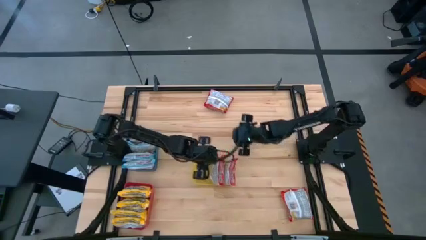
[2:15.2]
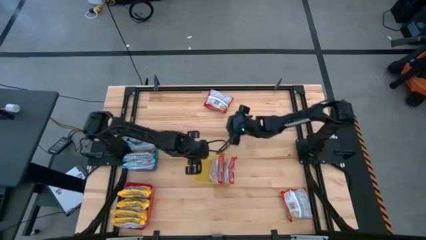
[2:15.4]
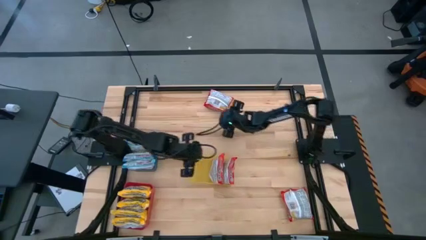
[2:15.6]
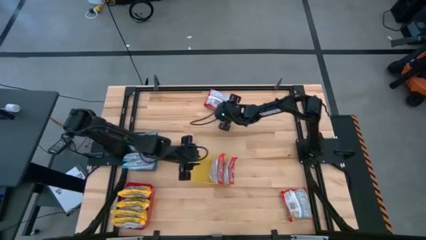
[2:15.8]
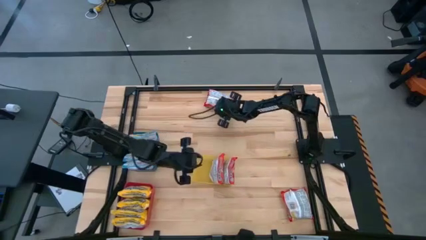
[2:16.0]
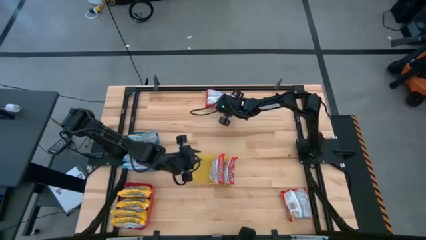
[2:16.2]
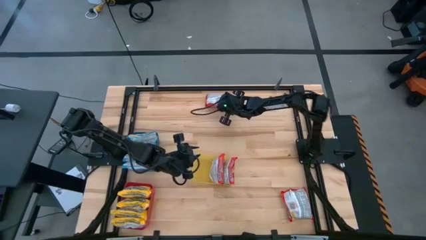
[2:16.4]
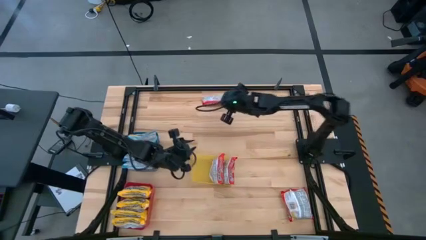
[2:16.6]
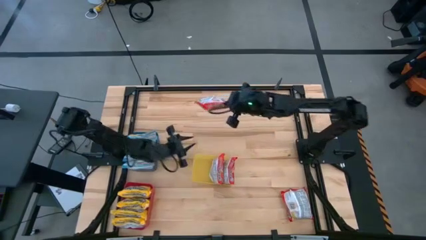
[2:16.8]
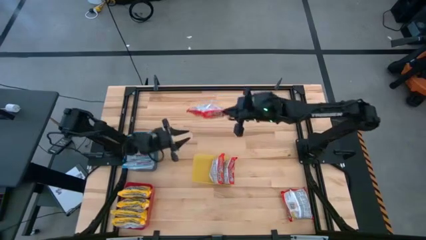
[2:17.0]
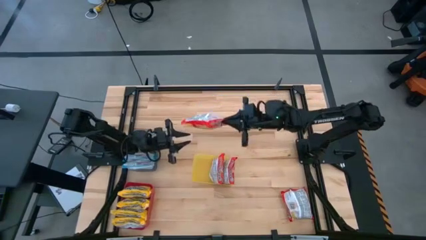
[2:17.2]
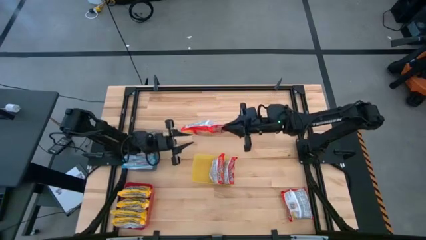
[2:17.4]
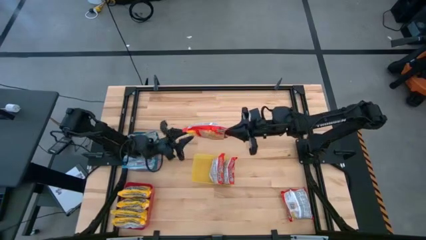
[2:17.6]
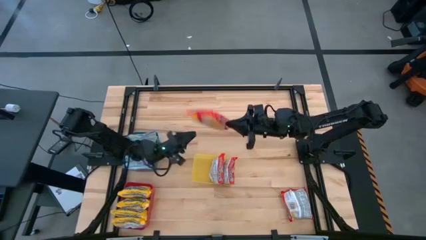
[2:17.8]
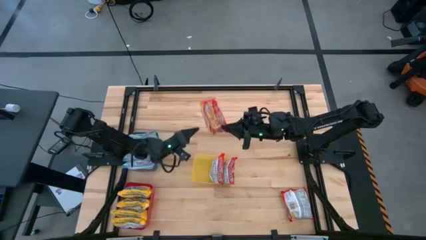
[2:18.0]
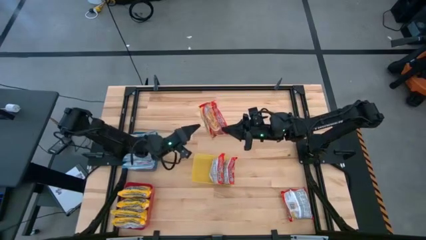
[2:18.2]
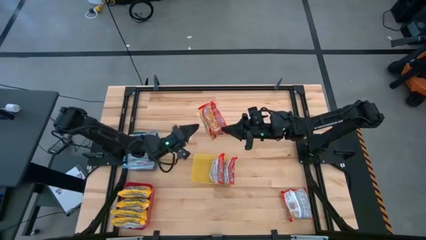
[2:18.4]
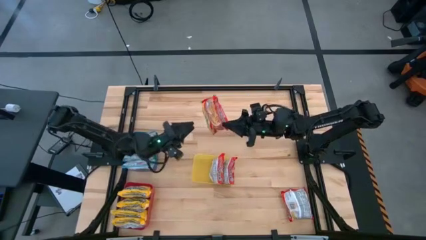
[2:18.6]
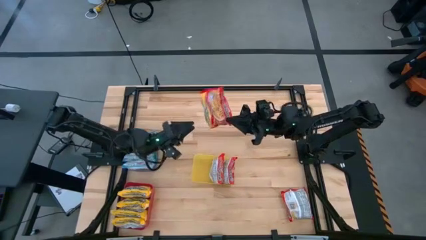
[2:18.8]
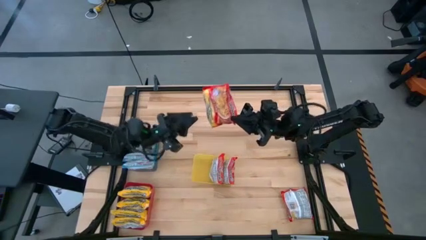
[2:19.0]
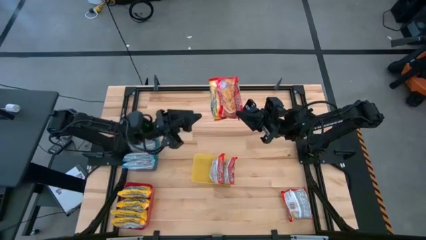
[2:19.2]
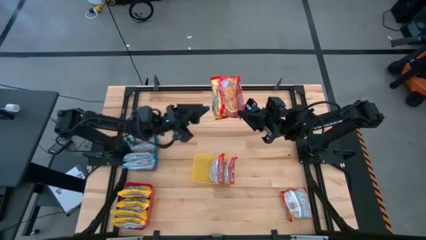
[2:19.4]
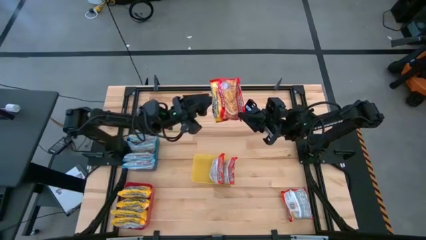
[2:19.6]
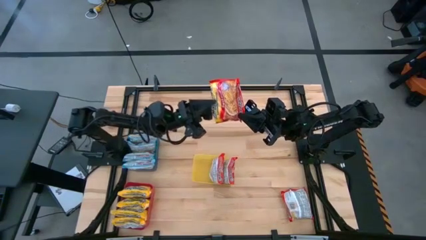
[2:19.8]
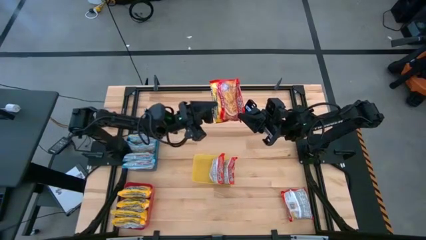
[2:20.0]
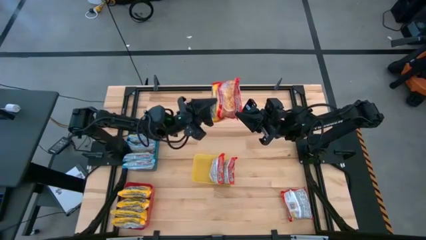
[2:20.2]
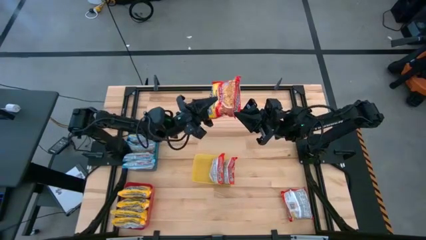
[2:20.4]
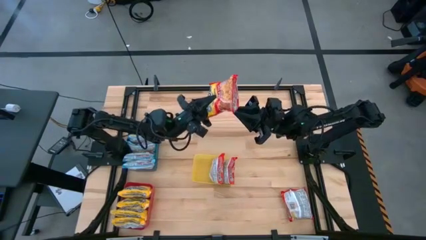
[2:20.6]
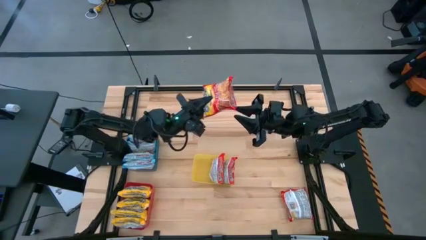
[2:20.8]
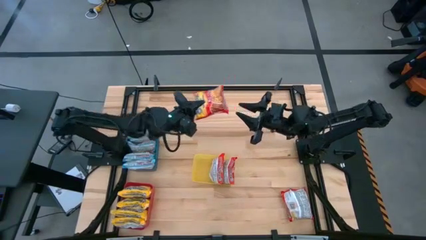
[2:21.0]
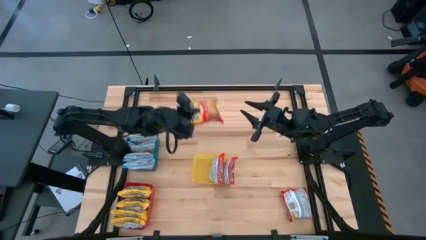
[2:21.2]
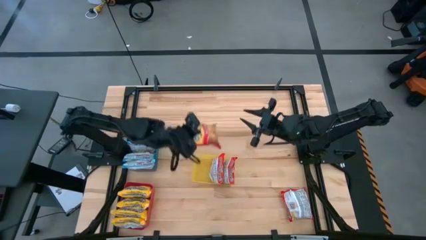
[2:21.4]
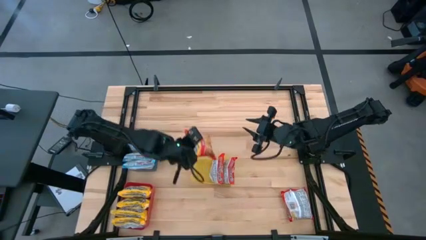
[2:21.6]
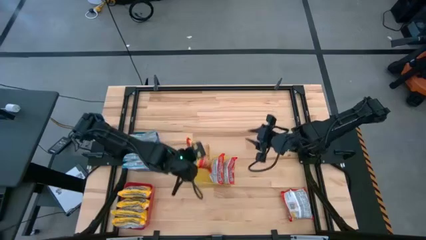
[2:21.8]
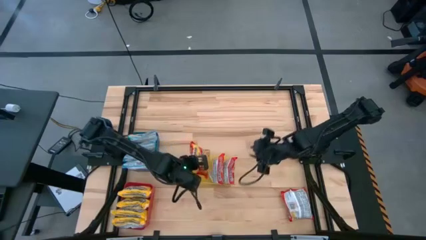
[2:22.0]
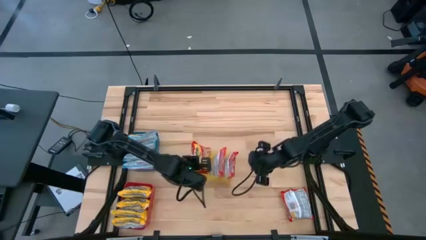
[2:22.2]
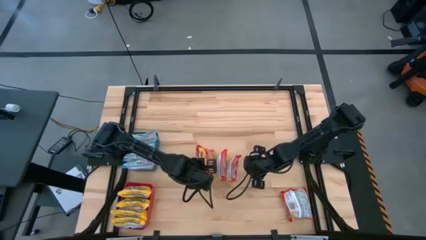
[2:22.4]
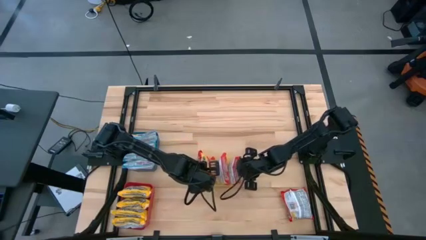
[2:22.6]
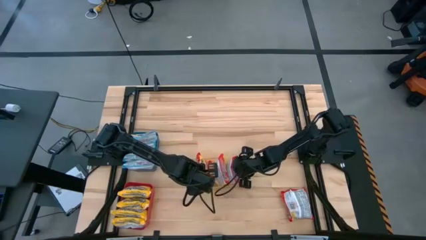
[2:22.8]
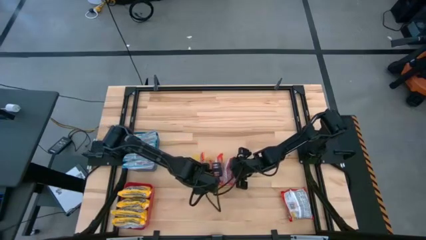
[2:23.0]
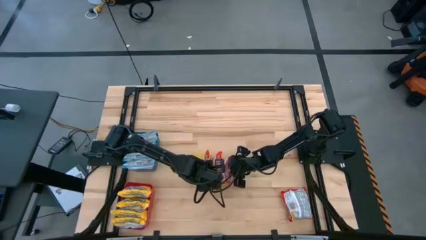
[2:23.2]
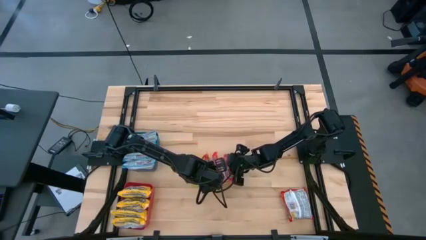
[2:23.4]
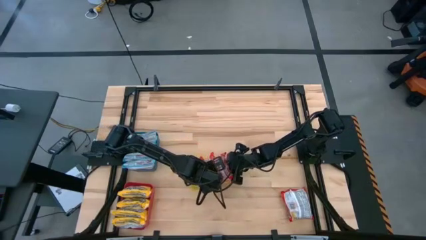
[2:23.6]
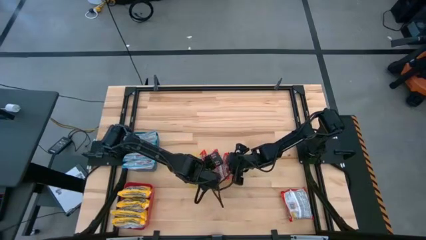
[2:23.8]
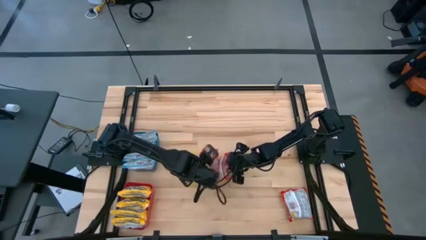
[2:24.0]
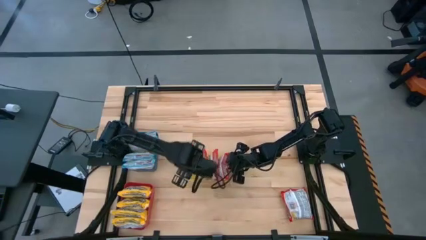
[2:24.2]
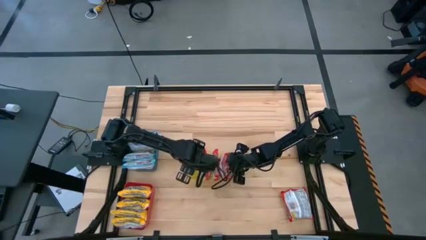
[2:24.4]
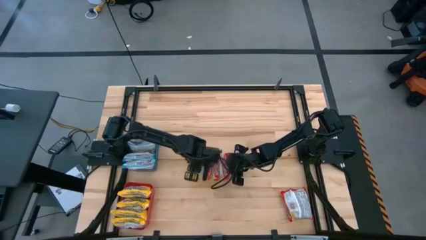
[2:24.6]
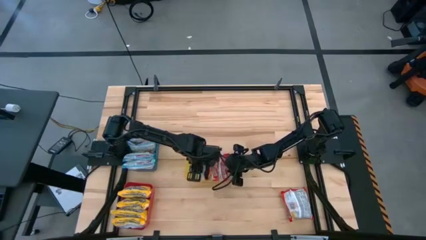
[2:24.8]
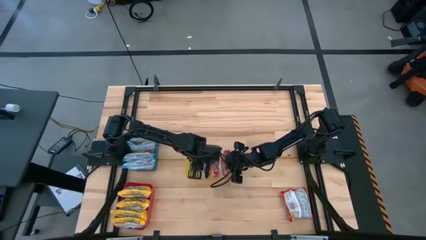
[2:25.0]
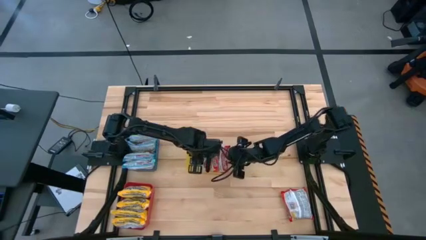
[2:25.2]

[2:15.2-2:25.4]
Task: Sort Maruchan noodles
Put the top red noodle pack into the yellow bin

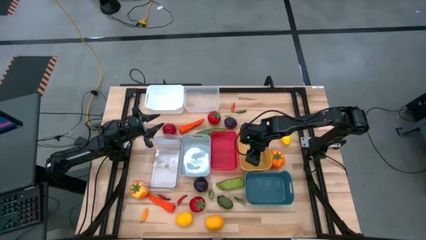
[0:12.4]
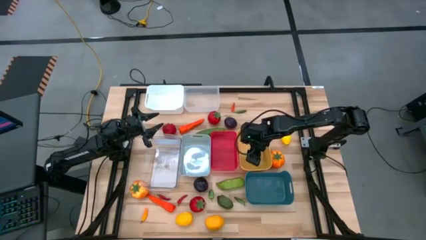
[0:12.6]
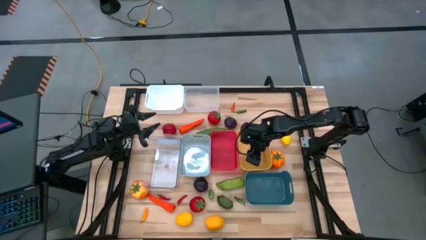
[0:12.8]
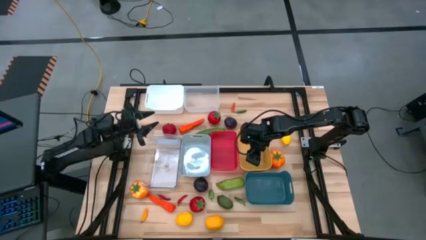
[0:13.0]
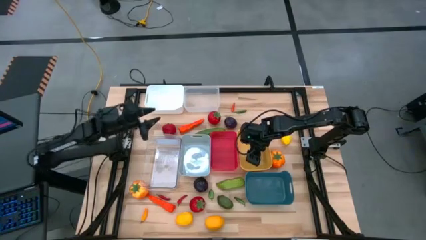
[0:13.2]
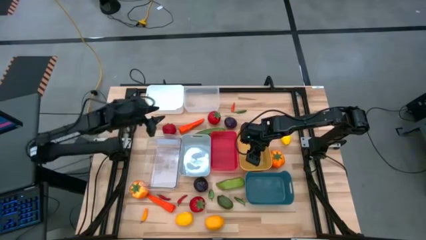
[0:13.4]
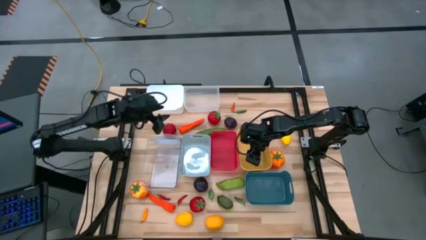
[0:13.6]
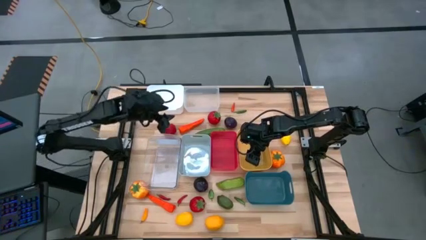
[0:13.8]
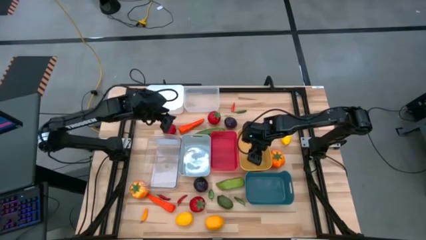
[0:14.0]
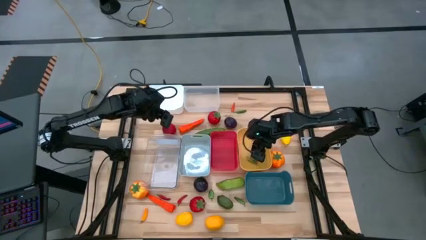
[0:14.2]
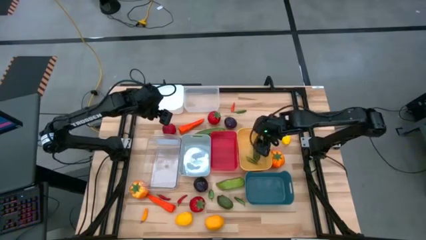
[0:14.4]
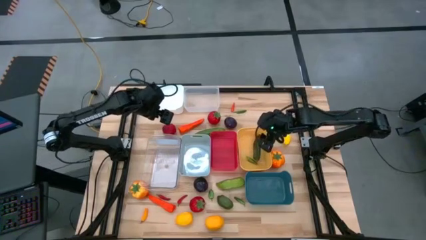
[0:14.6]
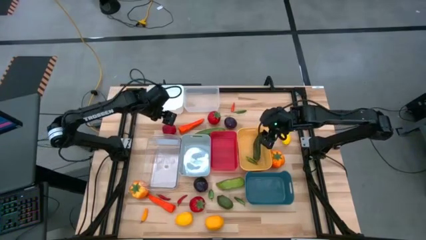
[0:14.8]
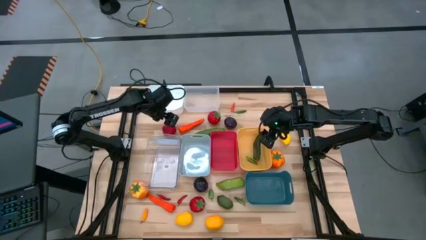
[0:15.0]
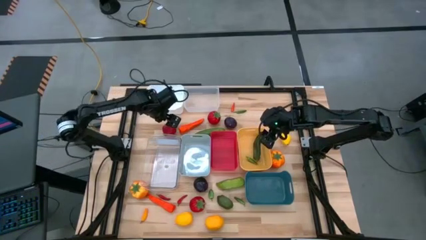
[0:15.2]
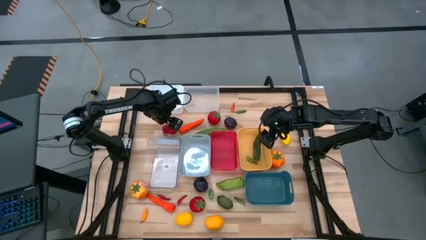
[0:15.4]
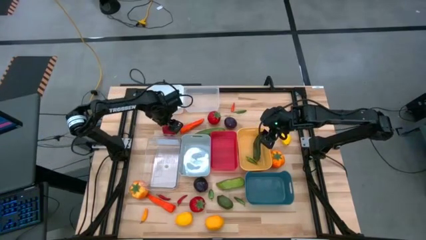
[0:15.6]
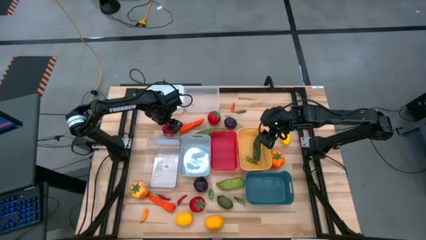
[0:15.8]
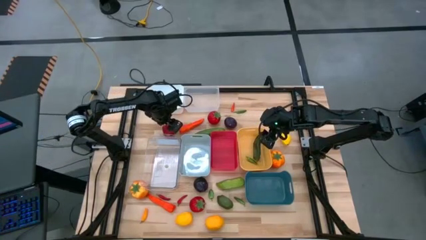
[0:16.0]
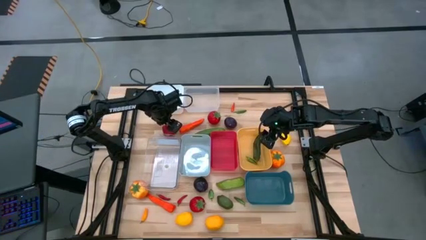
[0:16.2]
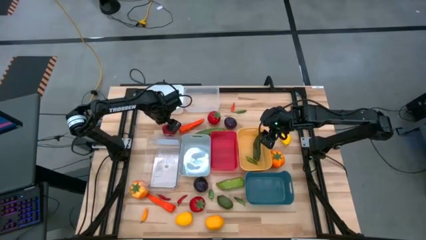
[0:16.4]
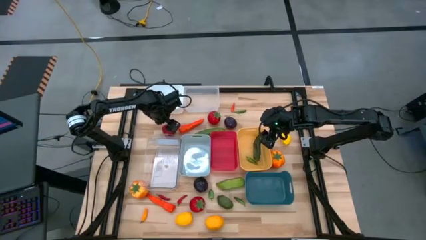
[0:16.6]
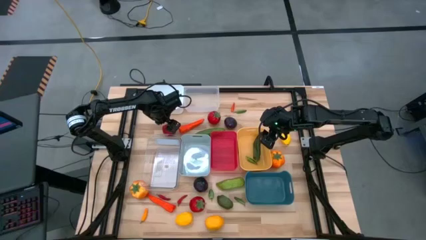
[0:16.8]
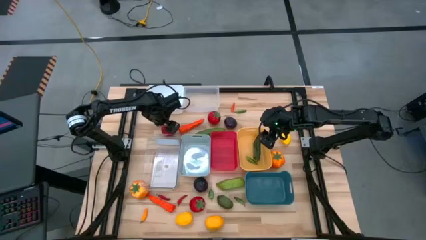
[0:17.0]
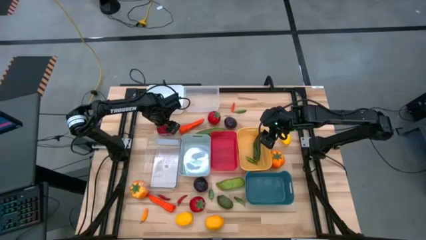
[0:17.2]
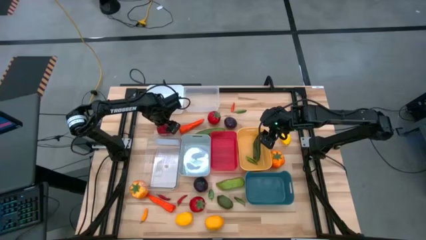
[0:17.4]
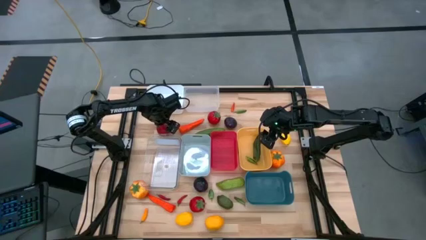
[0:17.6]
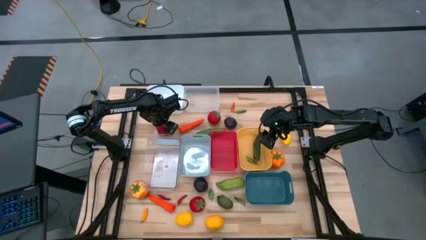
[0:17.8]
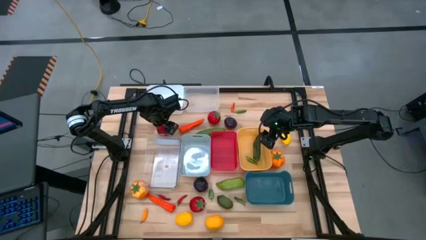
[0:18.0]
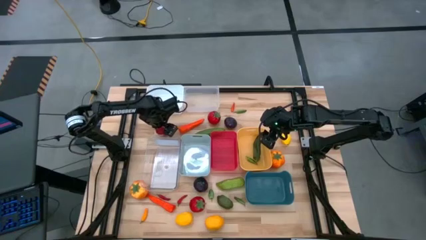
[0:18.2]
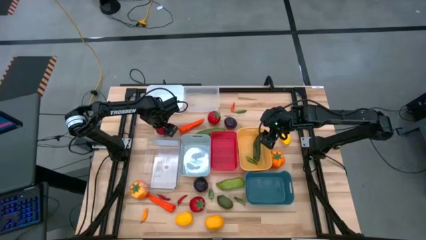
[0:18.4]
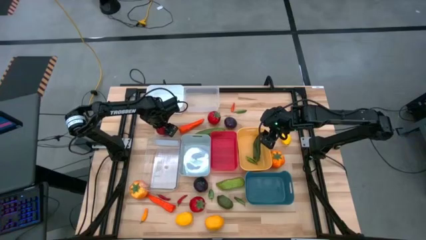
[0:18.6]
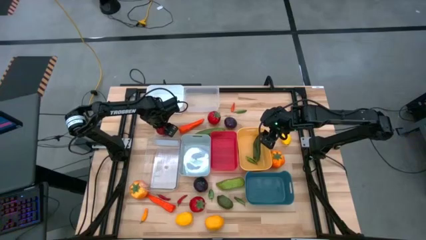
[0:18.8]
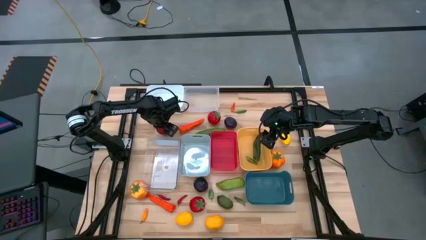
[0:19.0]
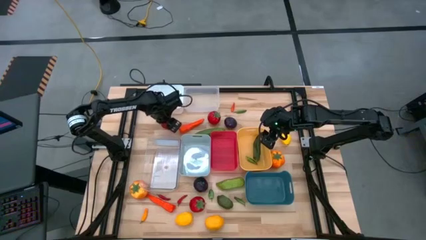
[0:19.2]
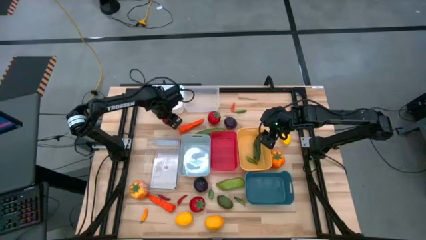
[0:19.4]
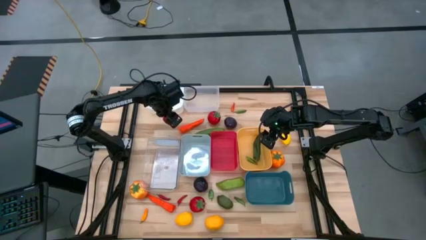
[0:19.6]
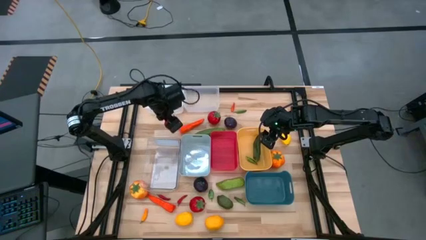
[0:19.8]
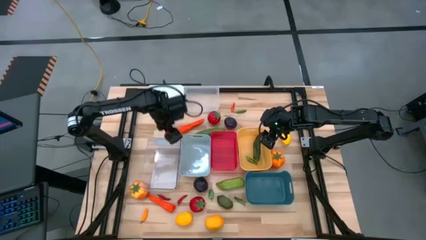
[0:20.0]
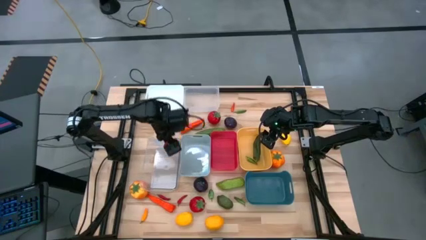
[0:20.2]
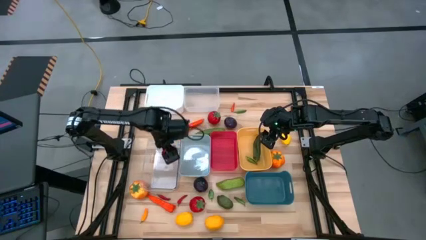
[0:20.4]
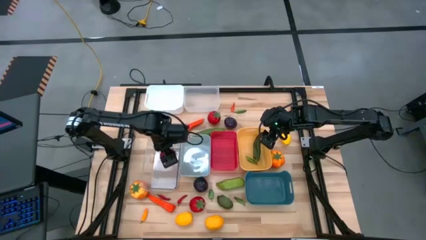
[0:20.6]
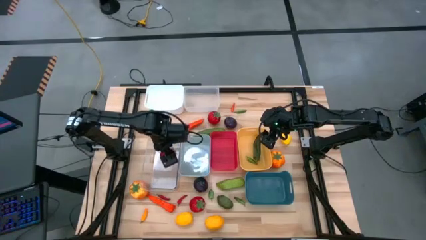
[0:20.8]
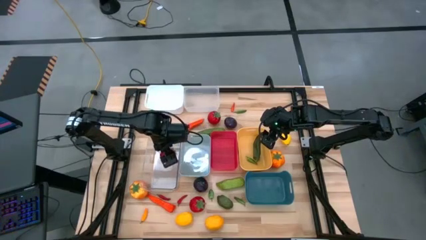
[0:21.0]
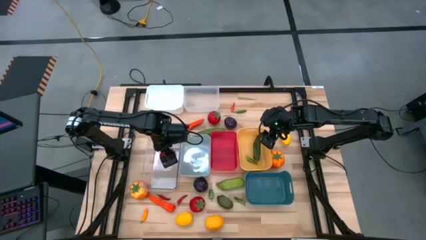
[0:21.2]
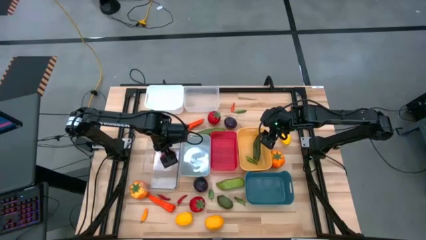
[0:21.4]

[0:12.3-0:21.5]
Task: Sort produce into baskets
Put the red tomato into the bottom transparent bin
